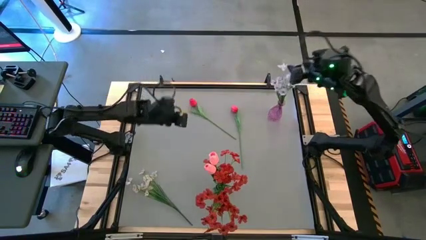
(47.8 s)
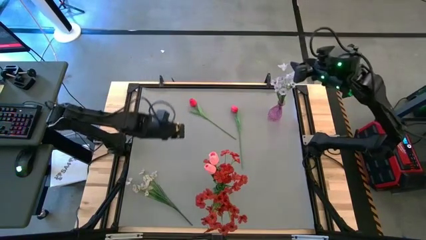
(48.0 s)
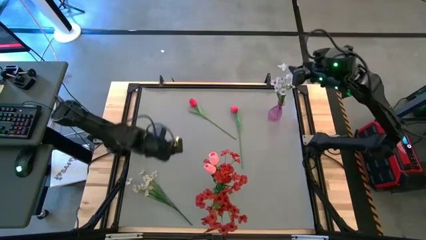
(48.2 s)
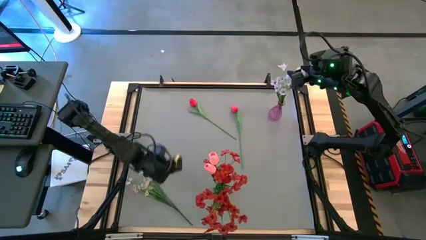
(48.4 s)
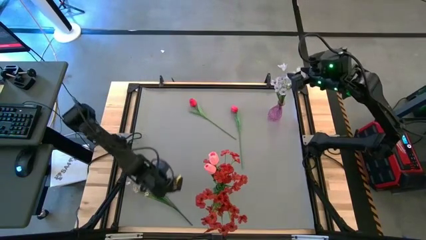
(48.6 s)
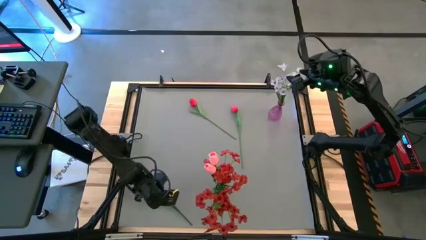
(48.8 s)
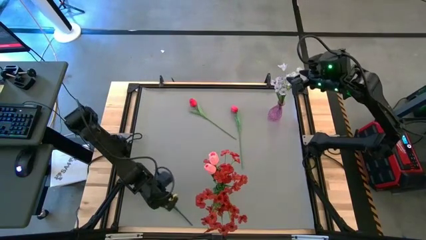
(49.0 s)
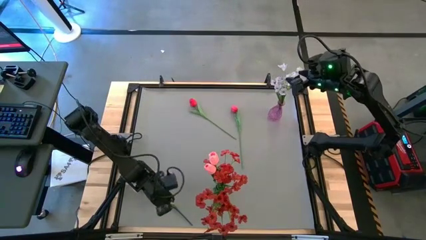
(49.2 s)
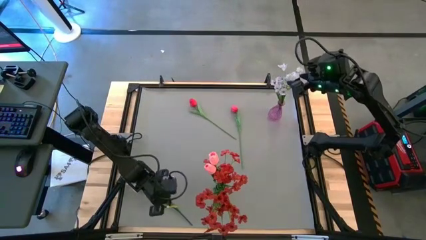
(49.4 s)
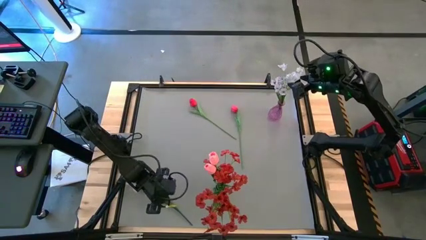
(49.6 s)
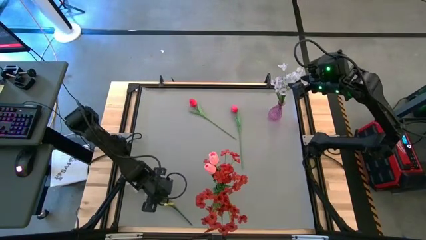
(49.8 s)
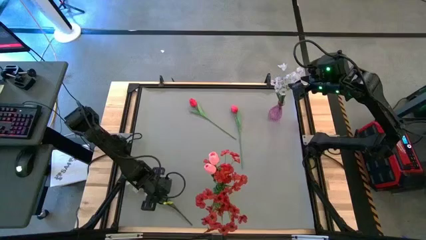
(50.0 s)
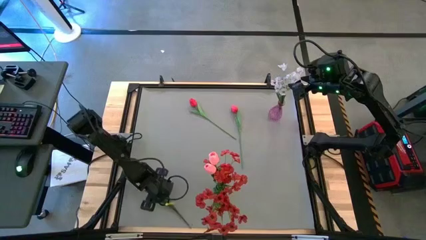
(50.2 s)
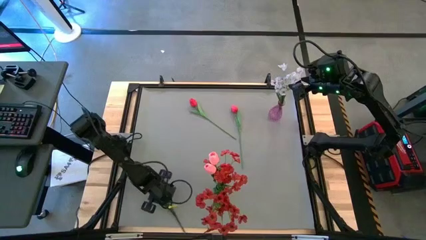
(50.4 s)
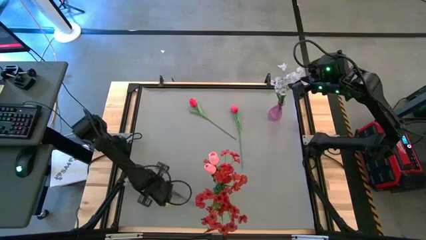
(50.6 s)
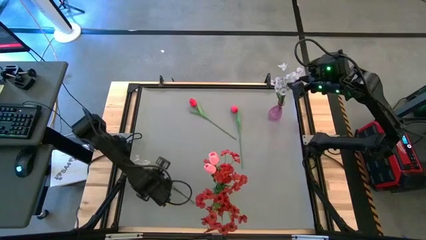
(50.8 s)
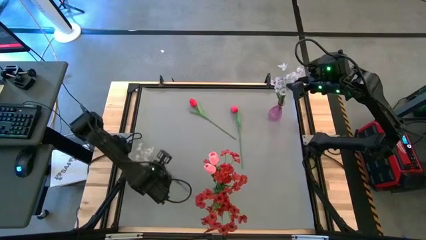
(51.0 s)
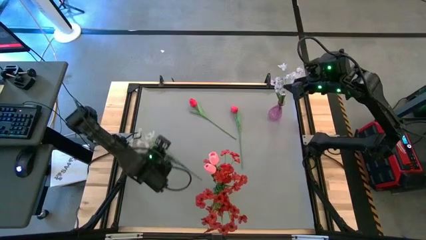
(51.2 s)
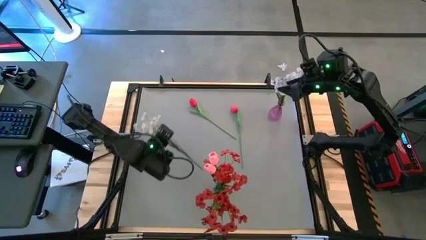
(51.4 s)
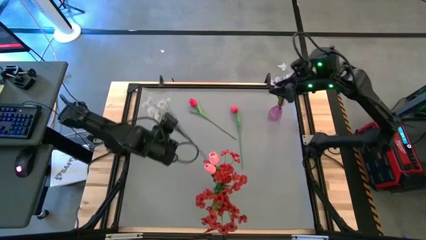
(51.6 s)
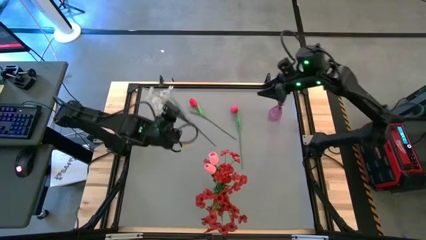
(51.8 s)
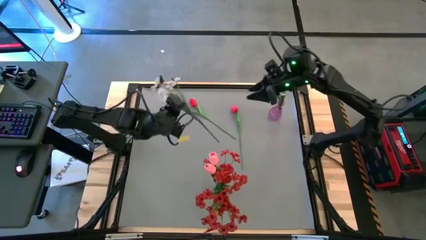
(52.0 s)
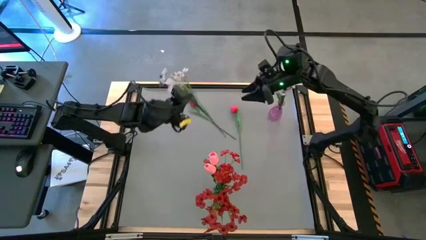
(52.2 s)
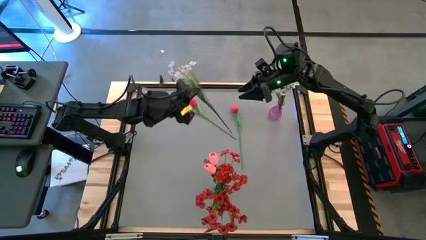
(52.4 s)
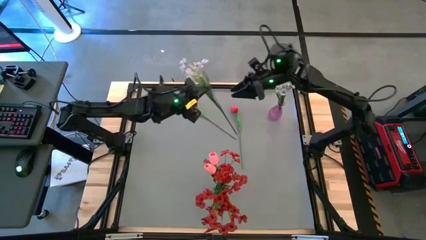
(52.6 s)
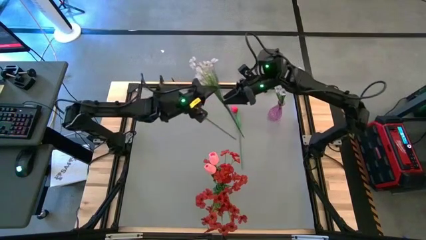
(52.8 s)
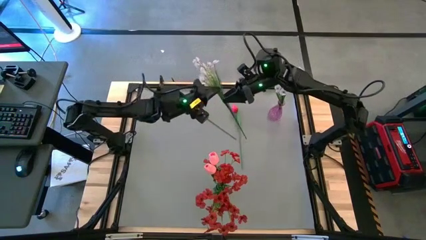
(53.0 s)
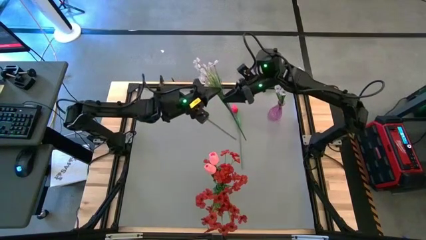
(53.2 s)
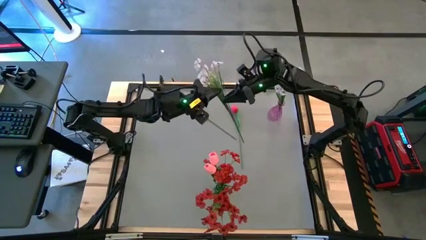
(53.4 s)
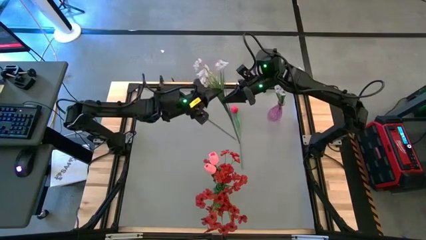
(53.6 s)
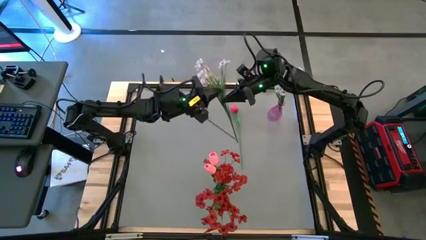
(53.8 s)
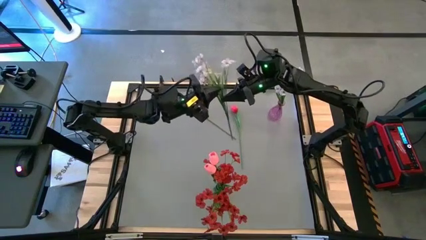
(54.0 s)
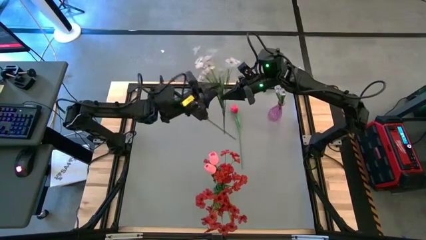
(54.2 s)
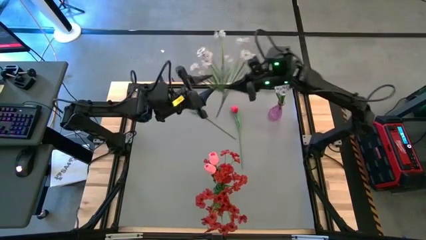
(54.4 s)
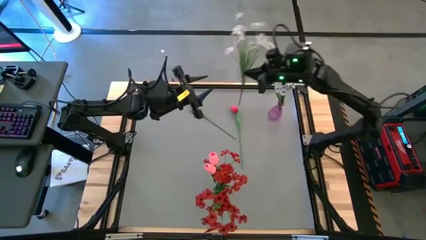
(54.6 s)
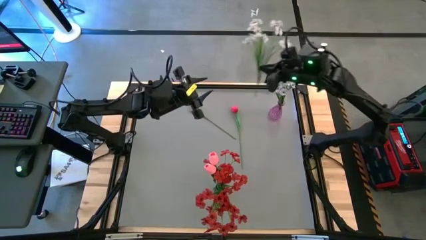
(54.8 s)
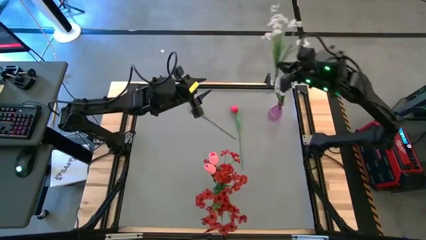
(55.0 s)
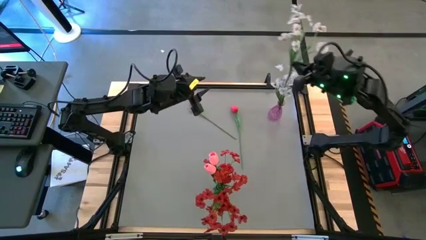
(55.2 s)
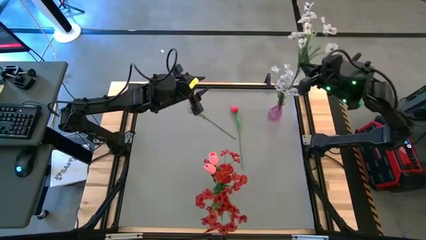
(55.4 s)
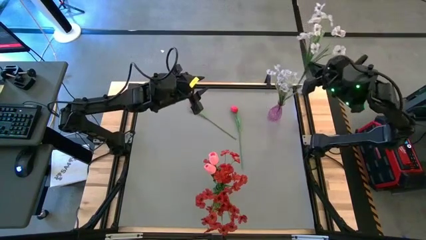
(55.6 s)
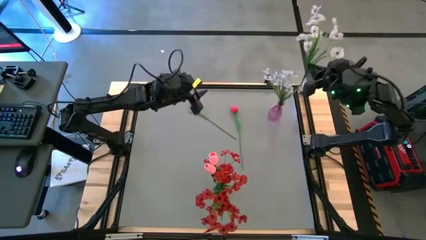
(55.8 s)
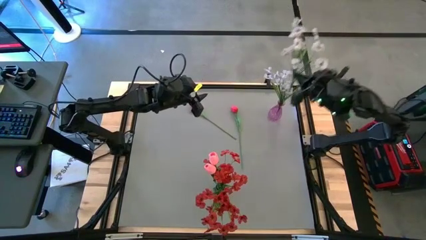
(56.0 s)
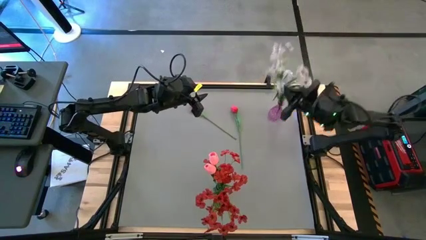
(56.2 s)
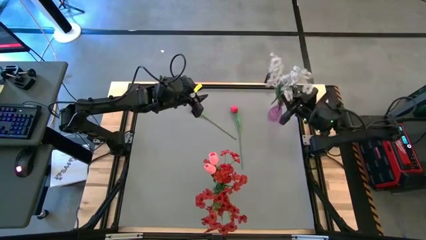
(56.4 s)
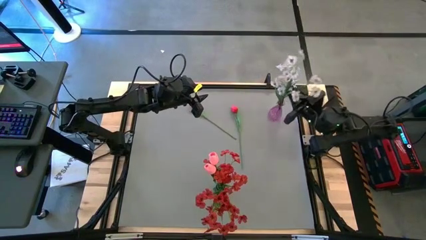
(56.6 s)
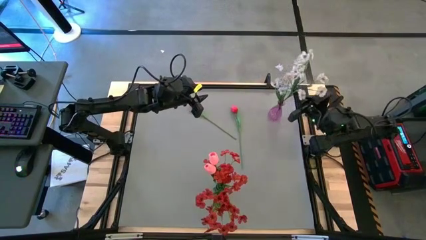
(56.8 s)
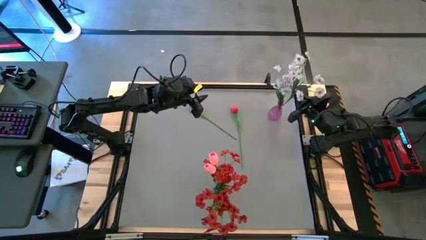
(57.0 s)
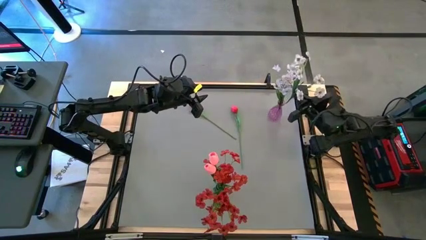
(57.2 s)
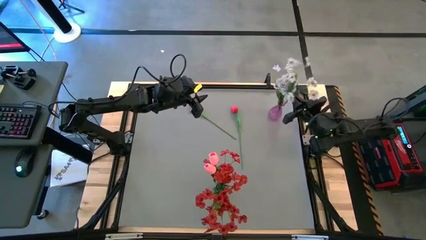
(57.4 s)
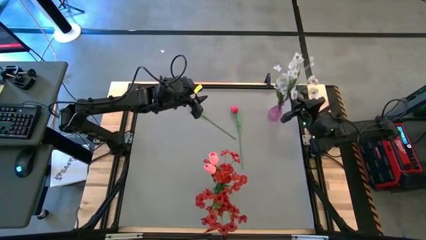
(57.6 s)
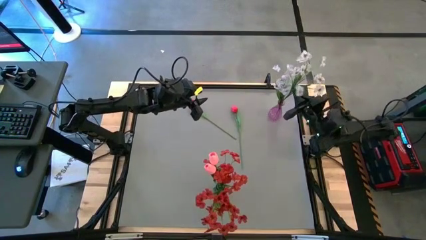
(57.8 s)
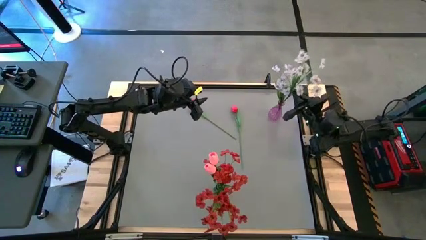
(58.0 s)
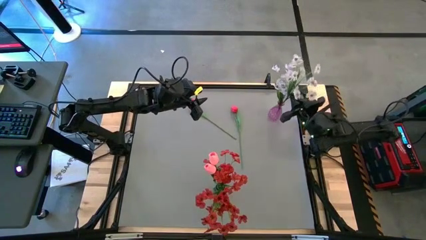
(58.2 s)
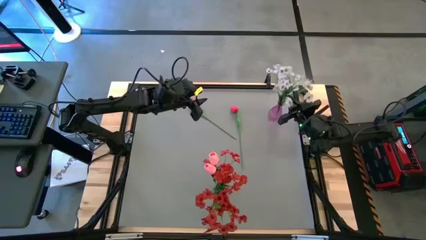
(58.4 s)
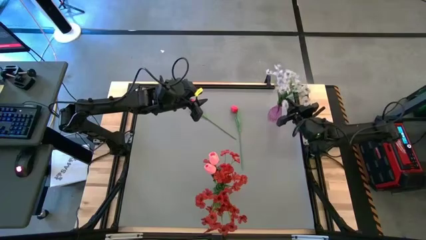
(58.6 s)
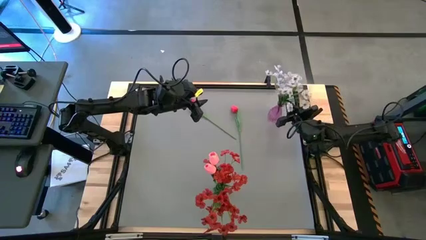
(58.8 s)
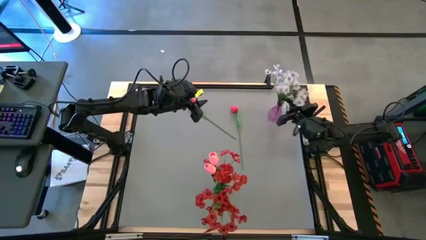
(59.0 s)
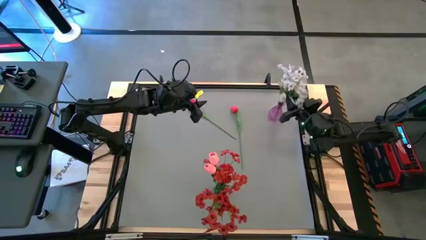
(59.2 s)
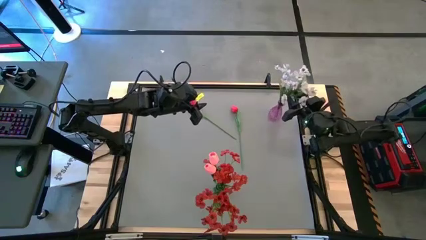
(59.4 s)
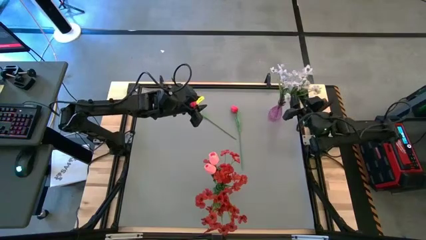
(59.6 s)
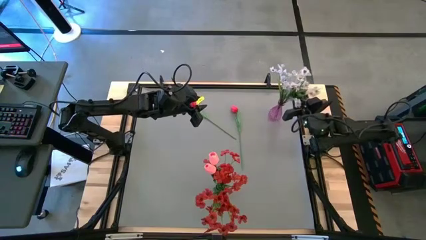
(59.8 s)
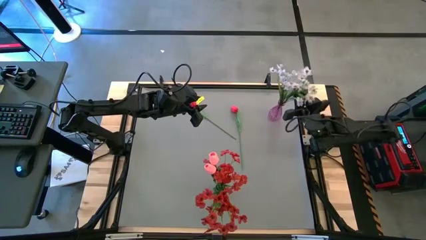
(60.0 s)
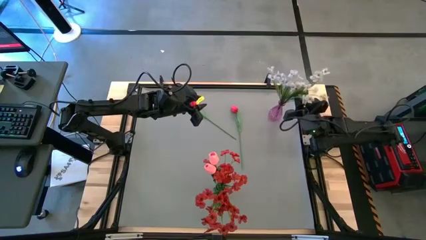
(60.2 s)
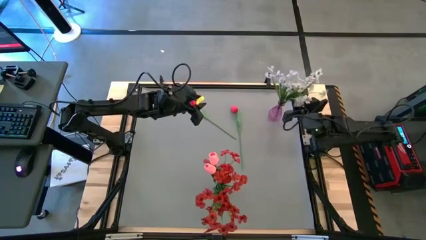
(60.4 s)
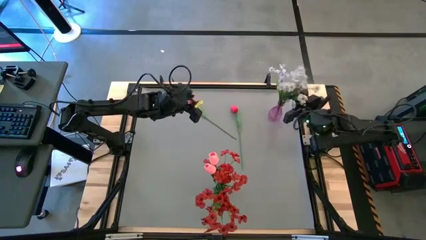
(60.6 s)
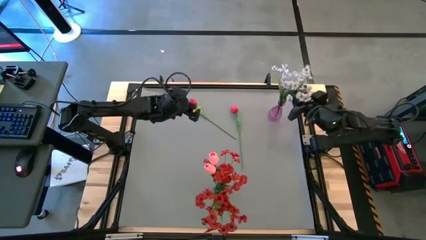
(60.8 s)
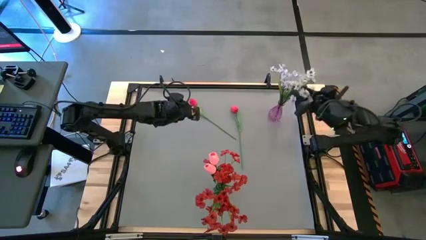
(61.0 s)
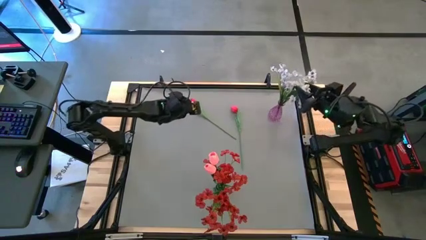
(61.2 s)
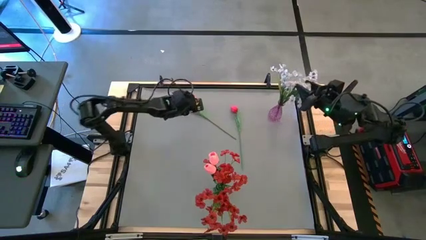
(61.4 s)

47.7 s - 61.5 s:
Task: Sort flowers into vase by color
Put the white flowers into the purple vase

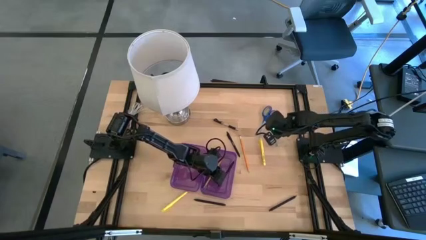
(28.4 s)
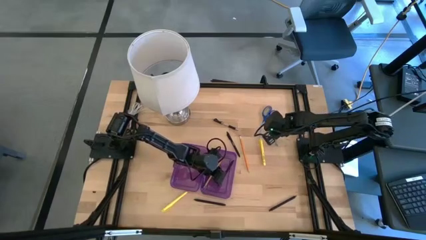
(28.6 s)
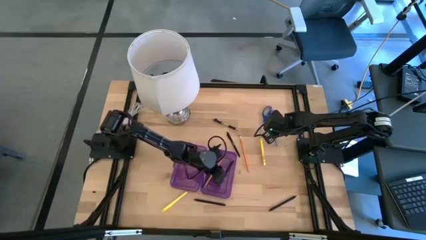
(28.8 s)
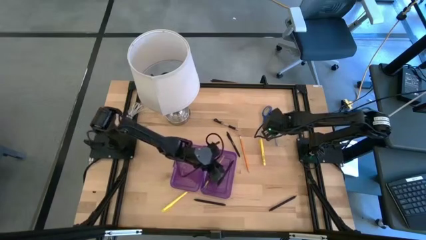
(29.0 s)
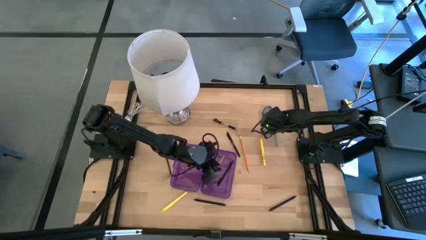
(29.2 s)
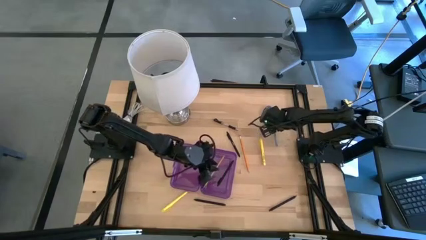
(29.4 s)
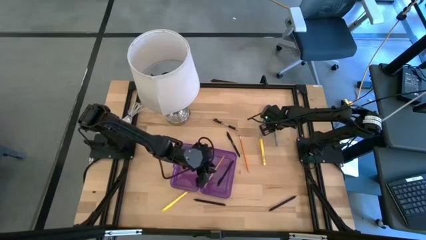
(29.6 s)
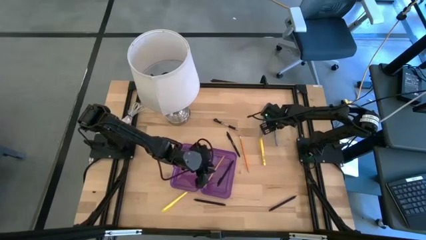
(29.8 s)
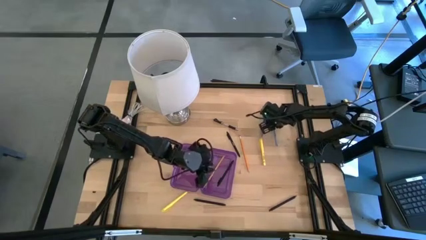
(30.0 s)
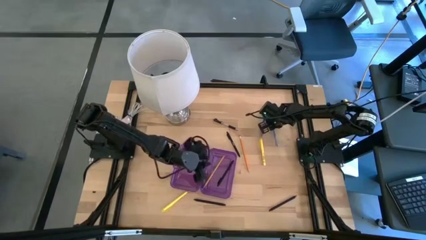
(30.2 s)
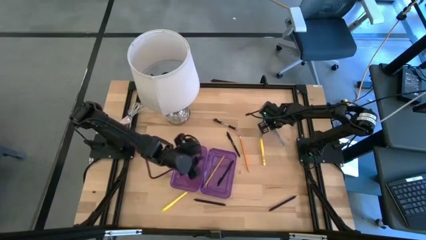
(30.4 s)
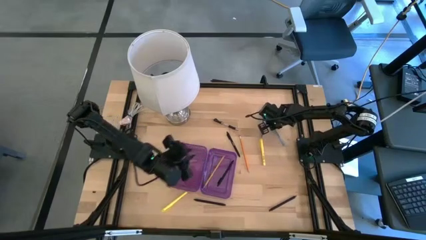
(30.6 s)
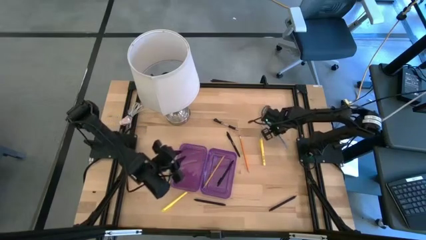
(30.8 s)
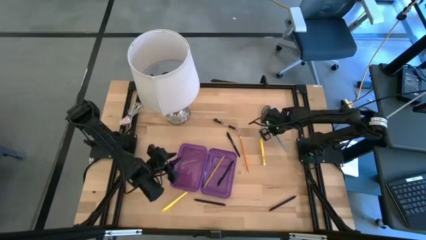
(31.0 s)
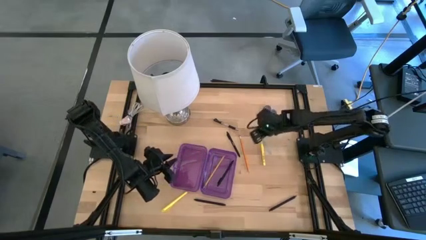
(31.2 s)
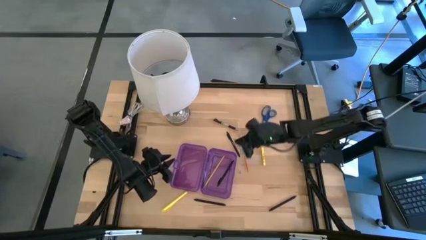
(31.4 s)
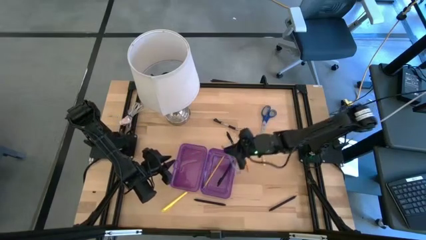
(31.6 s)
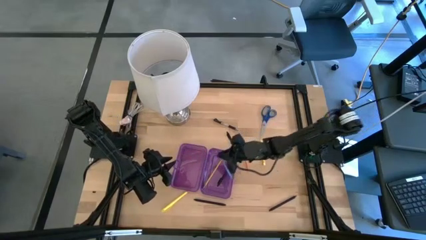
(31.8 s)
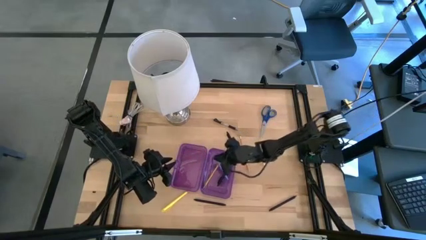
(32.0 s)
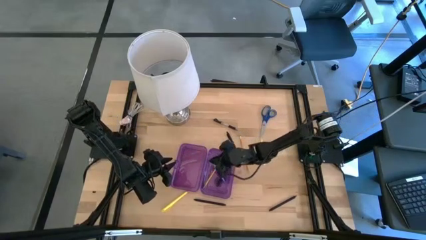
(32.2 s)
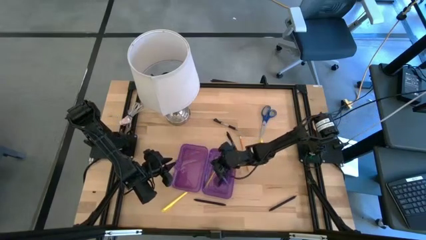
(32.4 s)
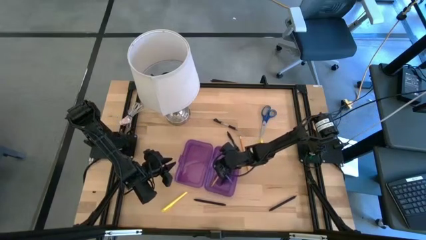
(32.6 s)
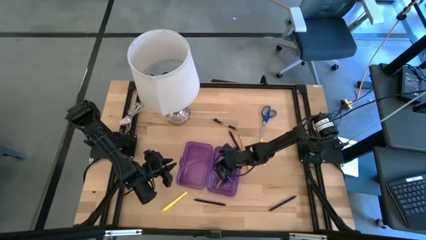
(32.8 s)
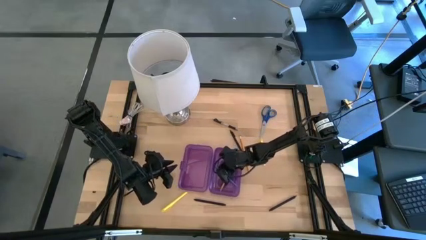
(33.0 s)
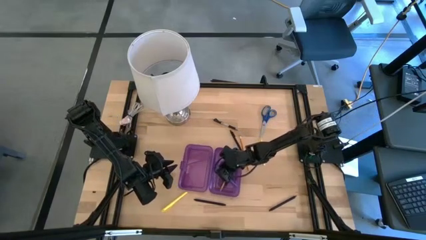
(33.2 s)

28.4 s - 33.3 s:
Task: Pick & place school supplies into a supply box
Put the blue pen into the purple supply box
